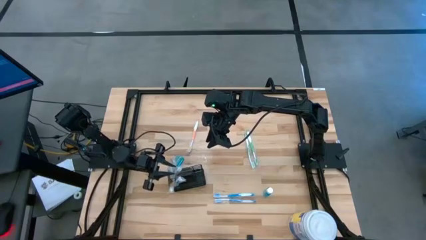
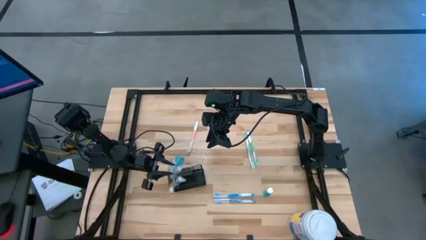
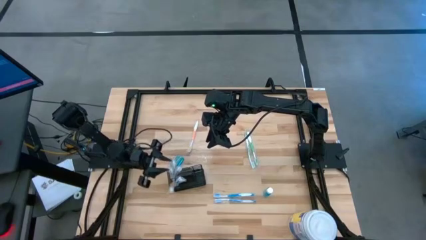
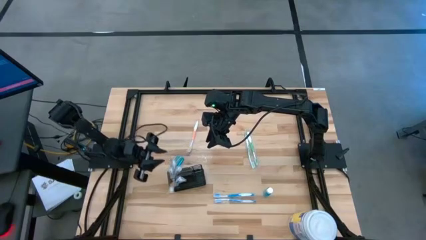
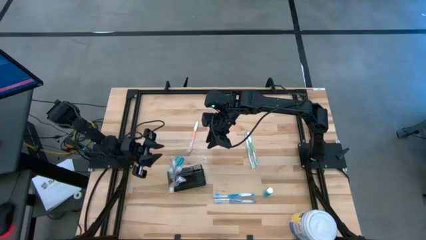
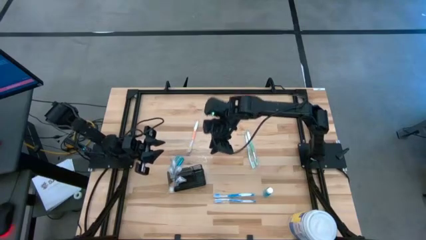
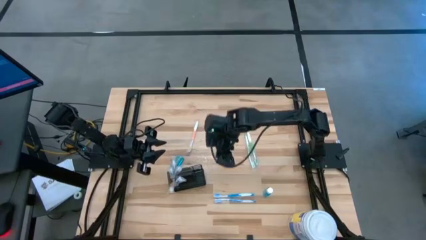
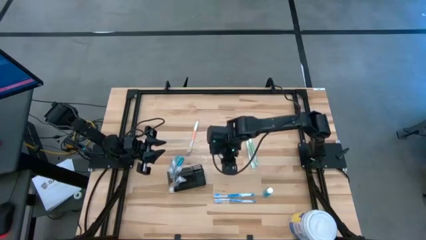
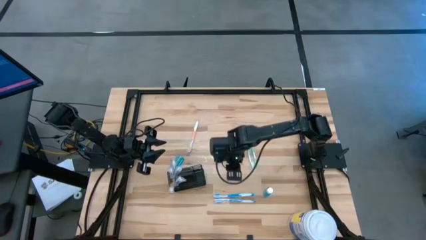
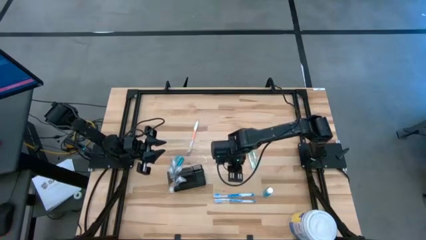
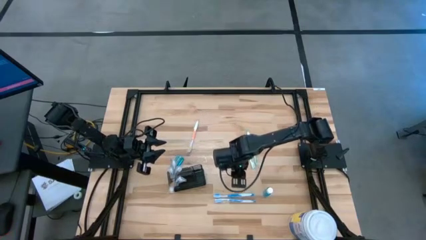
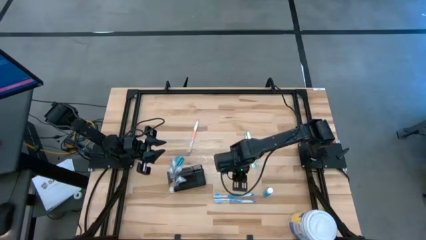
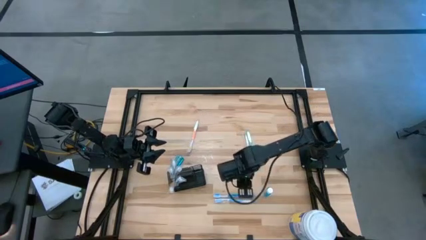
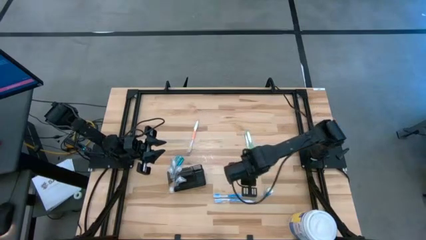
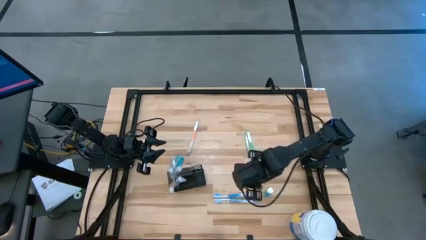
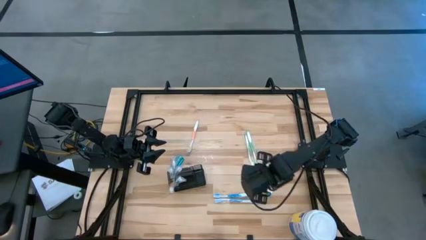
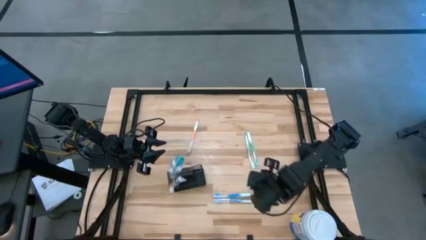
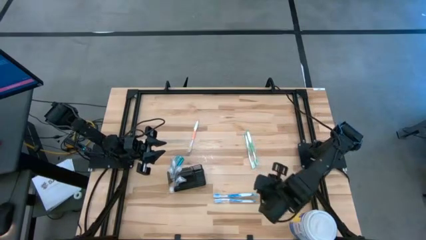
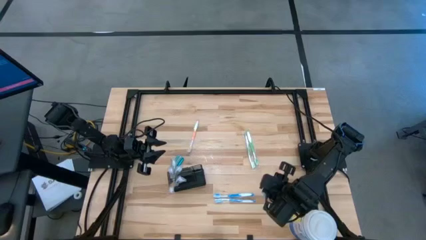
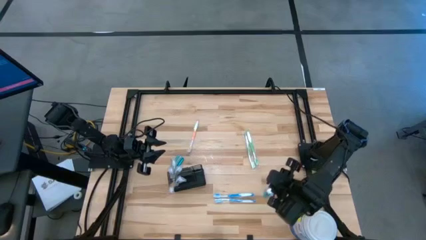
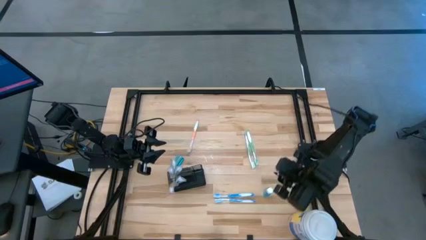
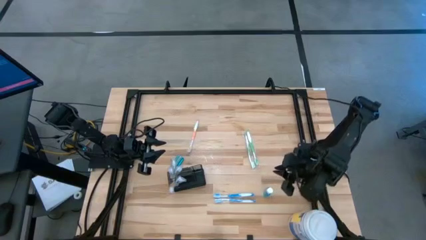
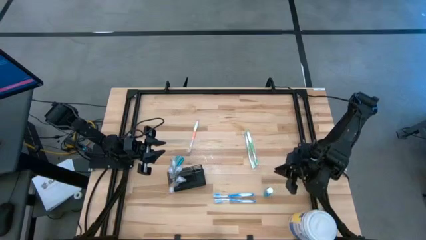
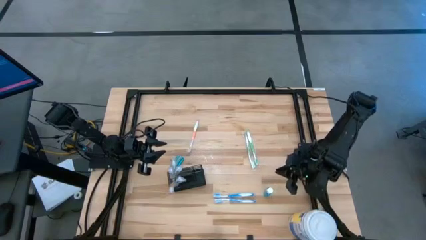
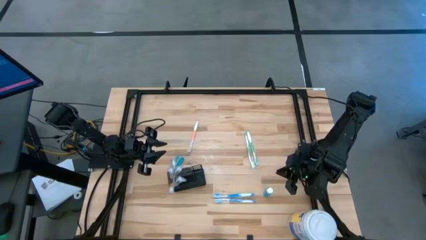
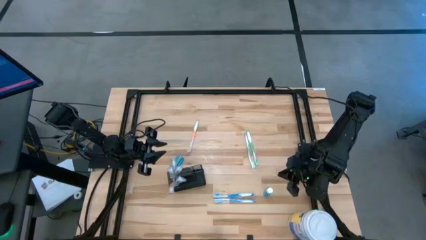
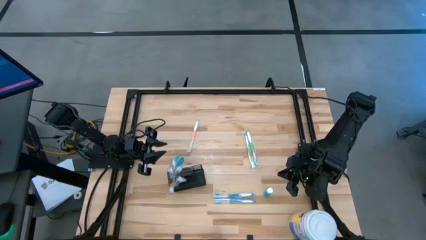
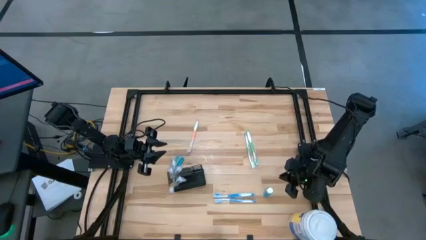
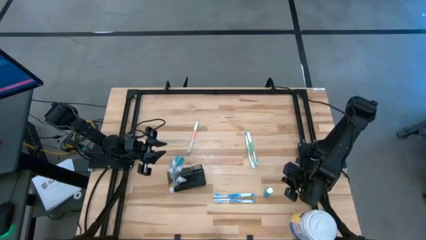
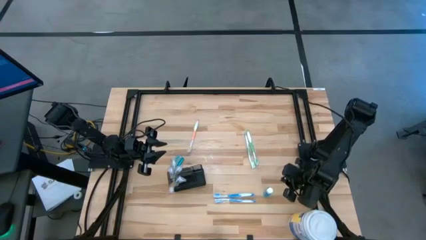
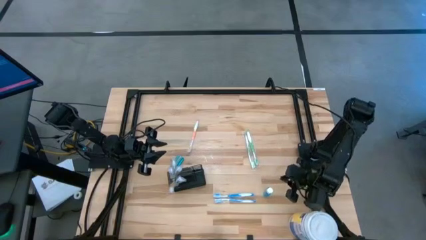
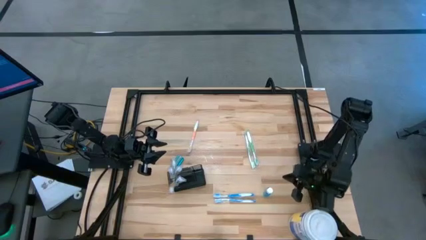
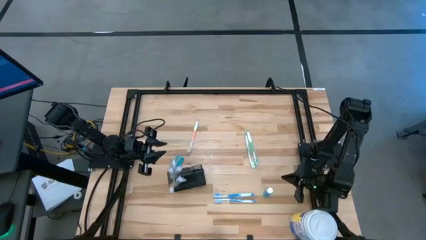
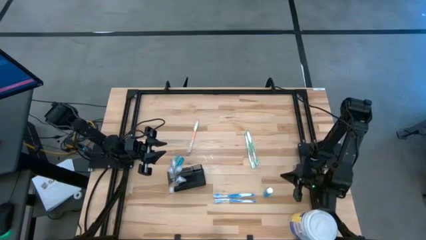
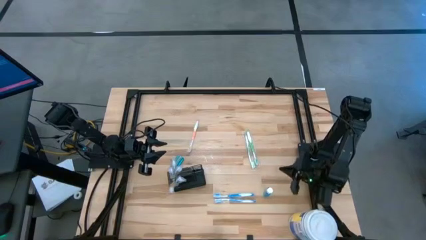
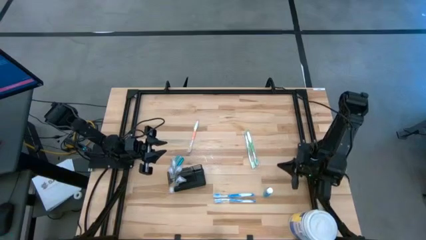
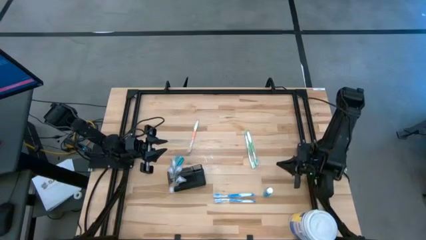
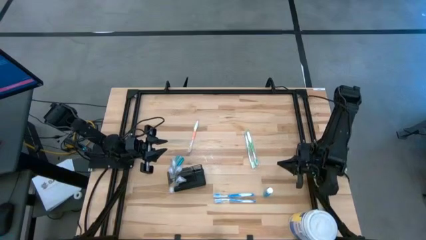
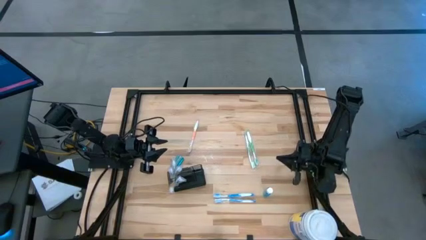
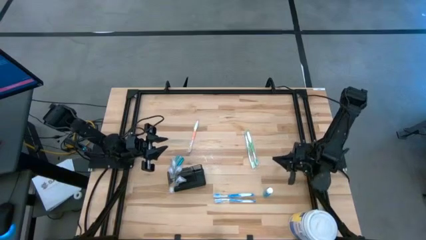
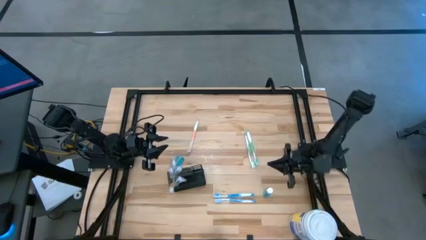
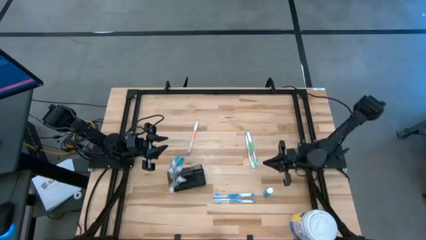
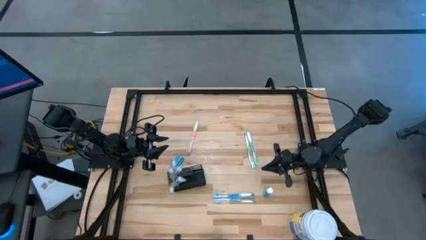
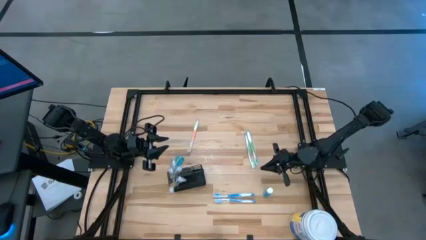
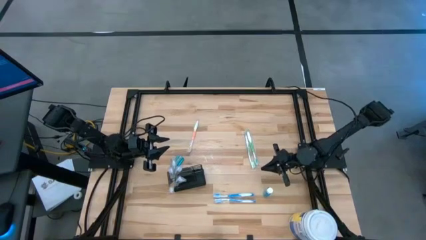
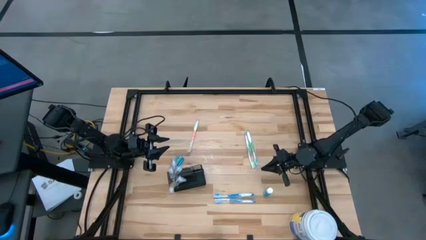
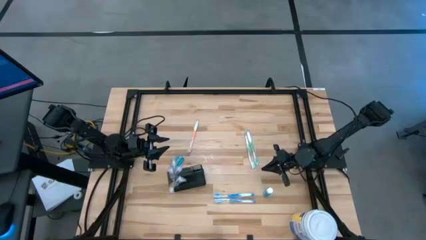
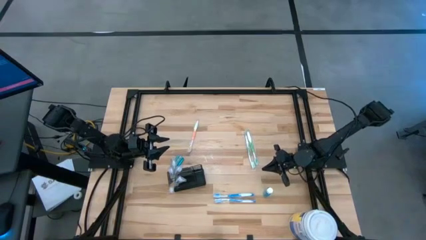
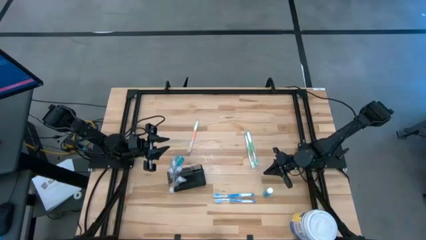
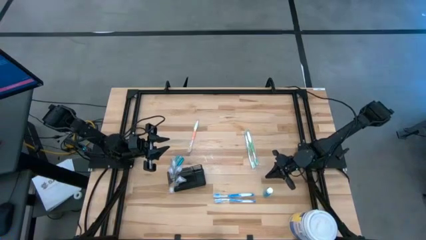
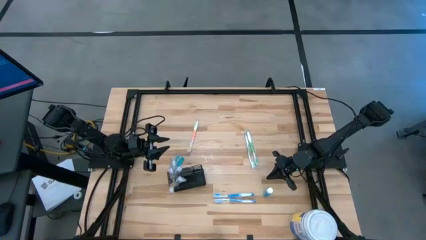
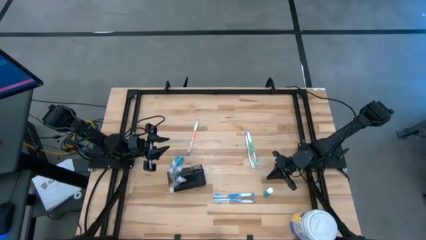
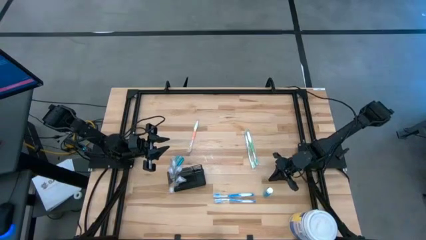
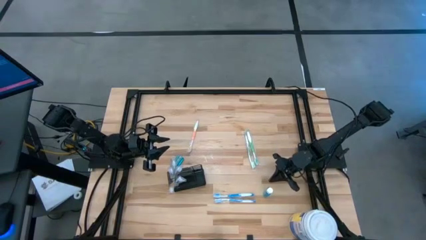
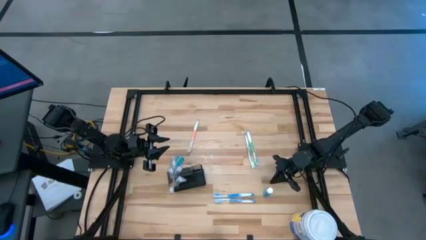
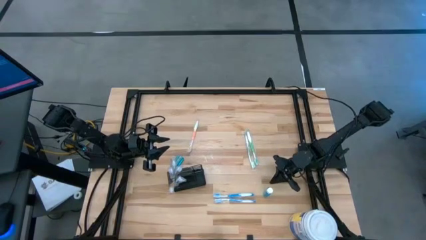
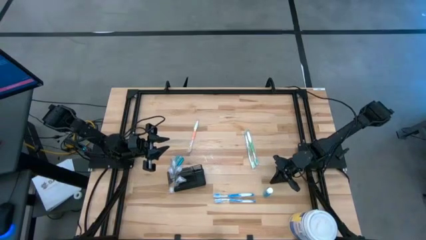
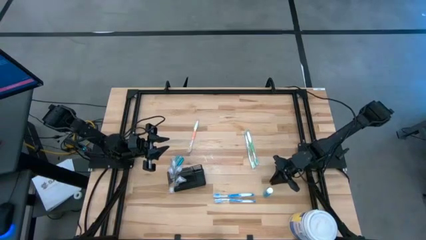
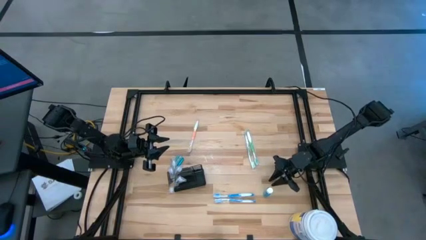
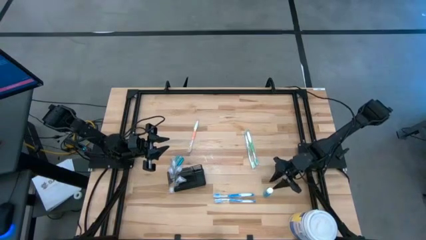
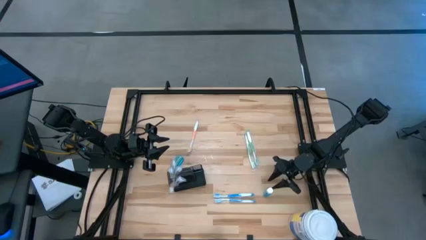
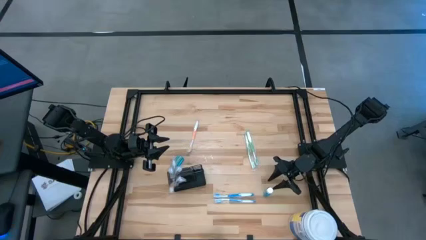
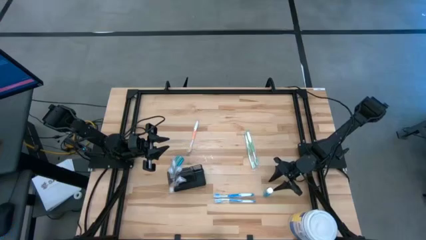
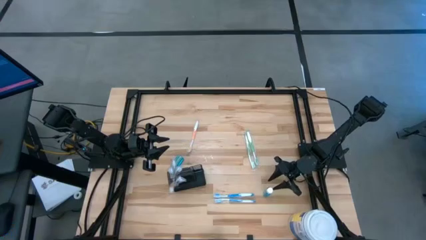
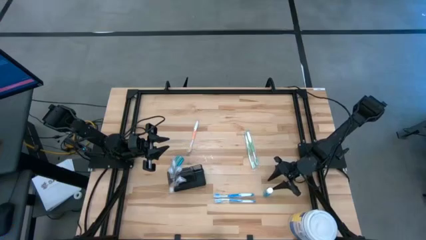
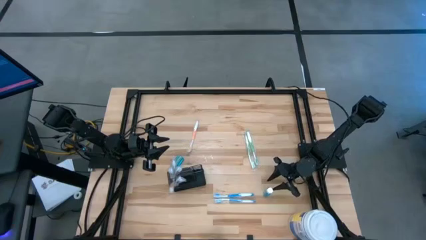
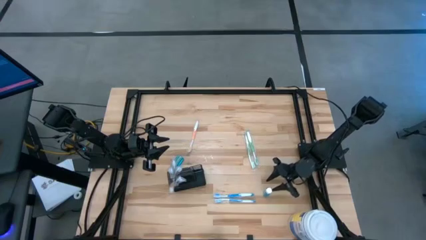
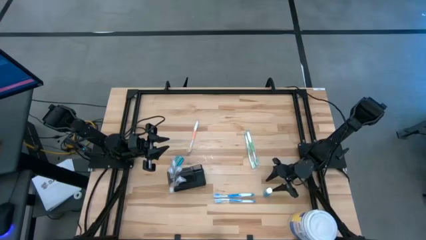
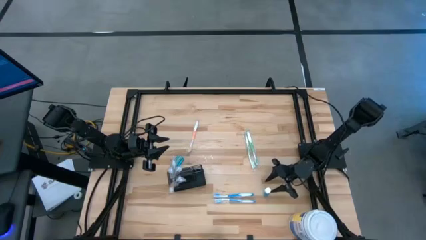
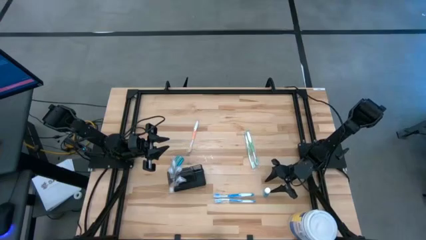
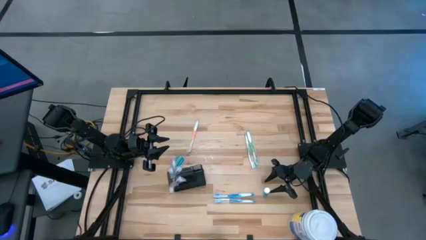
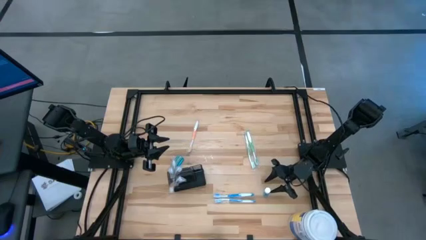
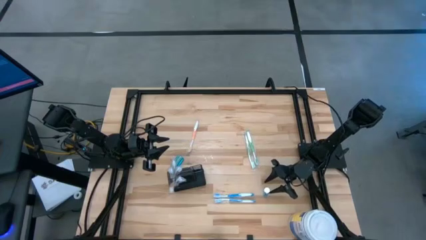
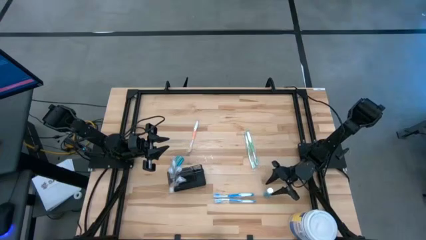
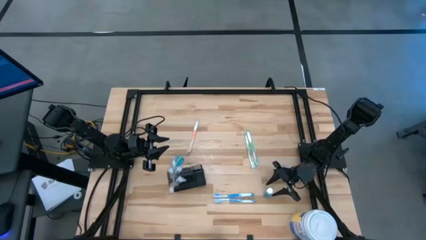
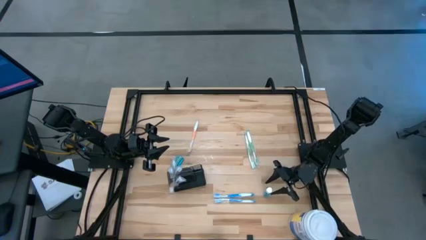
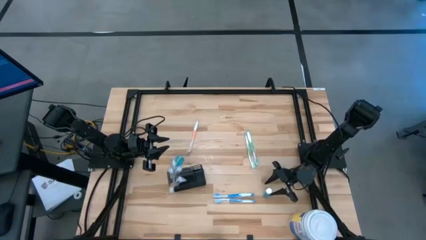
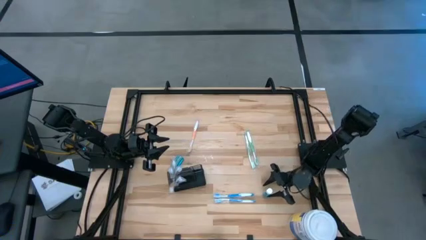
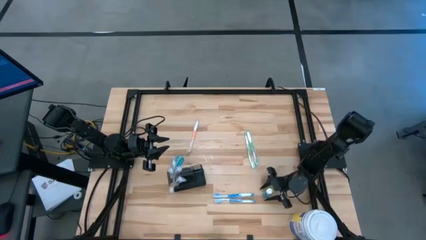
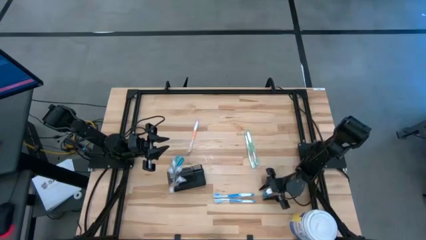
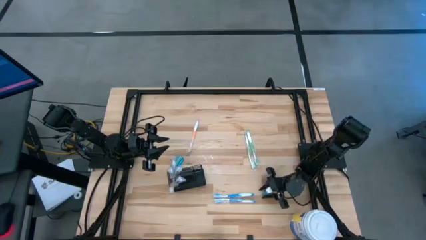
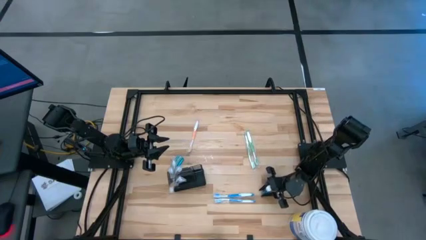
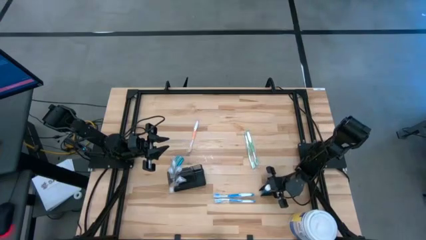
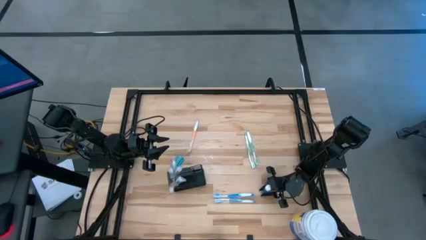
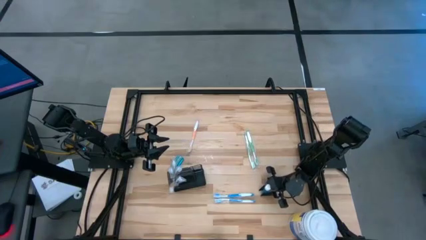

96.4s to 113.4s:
Task: Pick & Place toothbrushing station
Put the mouthwash into the black toothbrush rack
